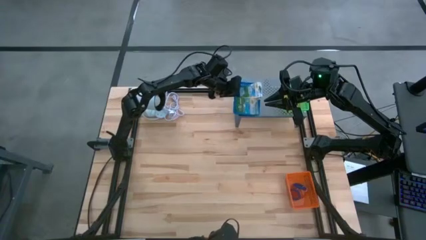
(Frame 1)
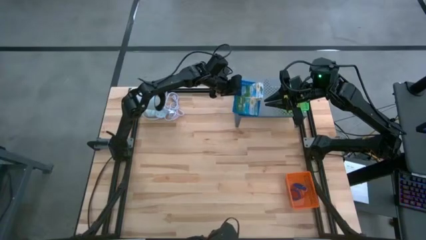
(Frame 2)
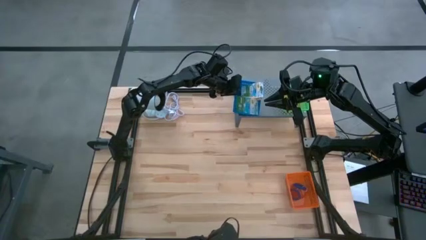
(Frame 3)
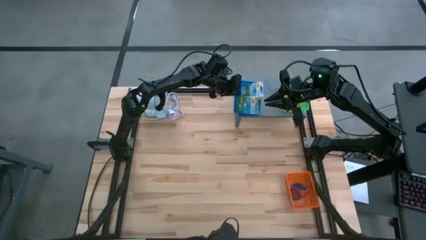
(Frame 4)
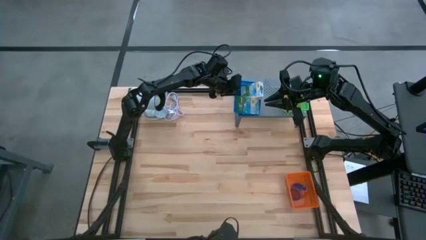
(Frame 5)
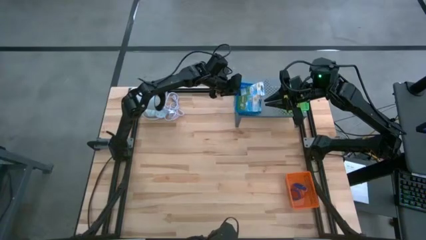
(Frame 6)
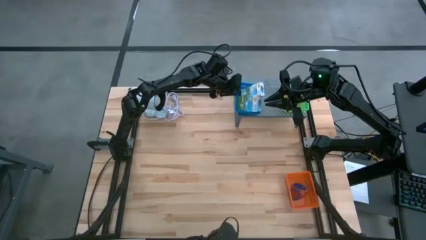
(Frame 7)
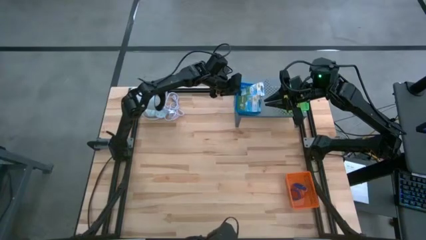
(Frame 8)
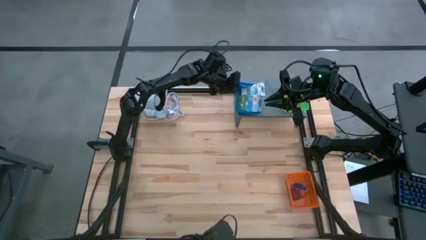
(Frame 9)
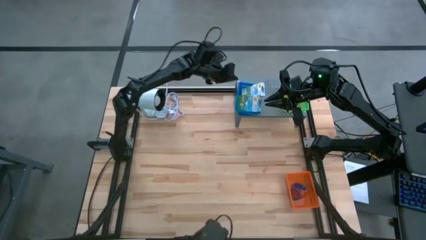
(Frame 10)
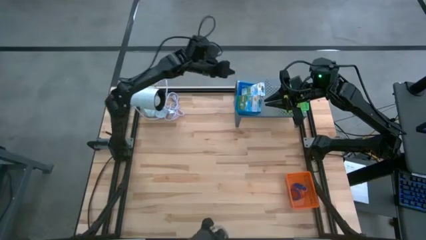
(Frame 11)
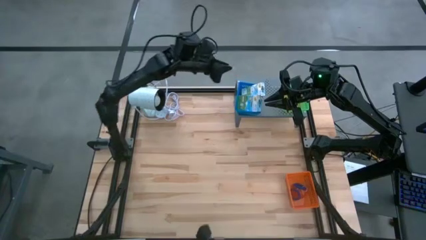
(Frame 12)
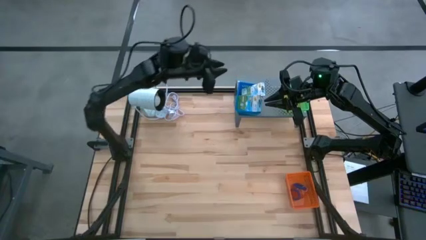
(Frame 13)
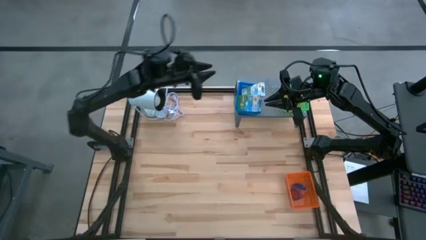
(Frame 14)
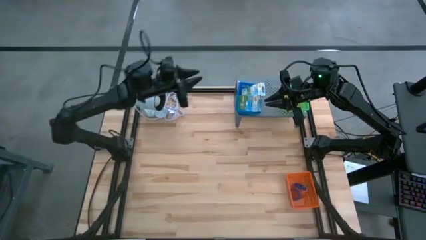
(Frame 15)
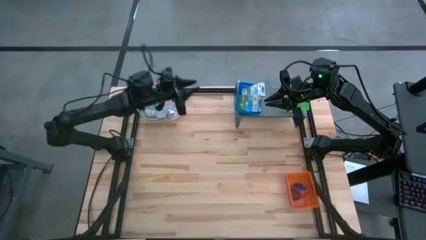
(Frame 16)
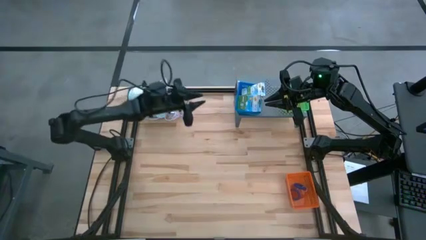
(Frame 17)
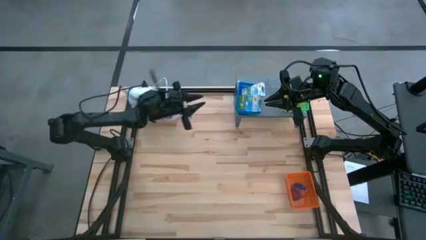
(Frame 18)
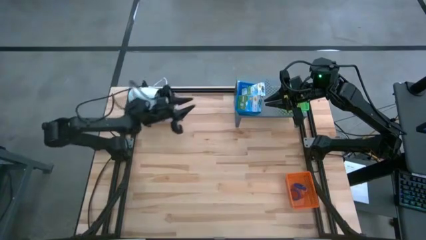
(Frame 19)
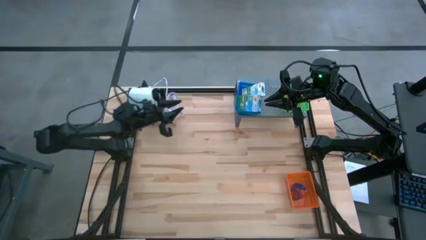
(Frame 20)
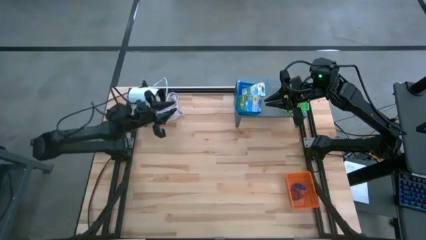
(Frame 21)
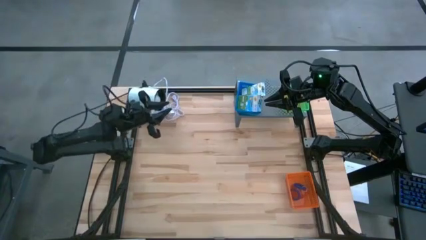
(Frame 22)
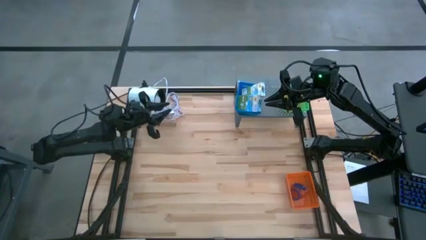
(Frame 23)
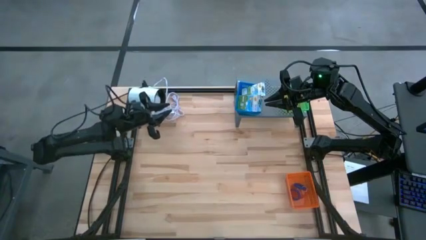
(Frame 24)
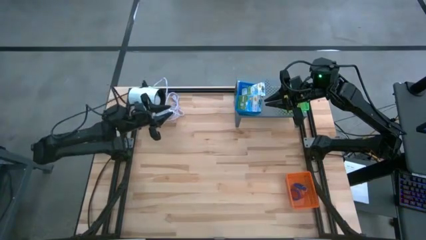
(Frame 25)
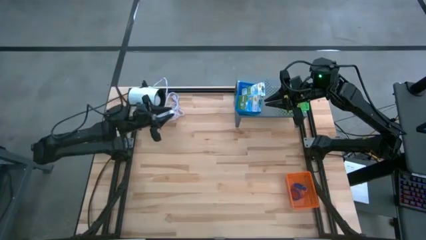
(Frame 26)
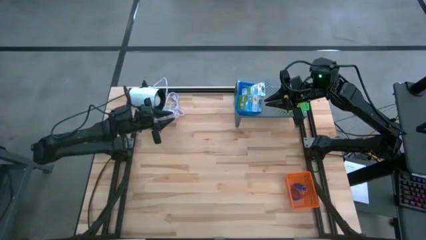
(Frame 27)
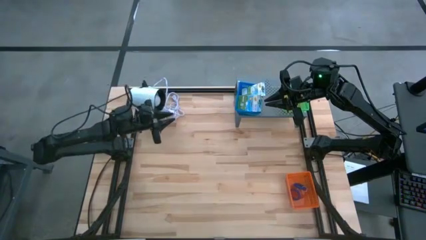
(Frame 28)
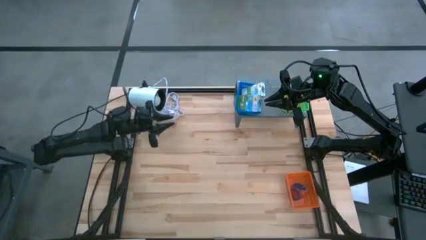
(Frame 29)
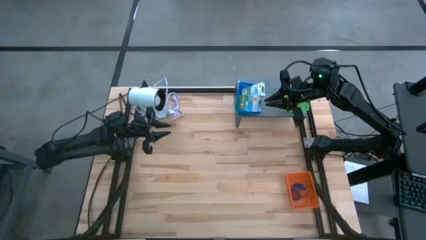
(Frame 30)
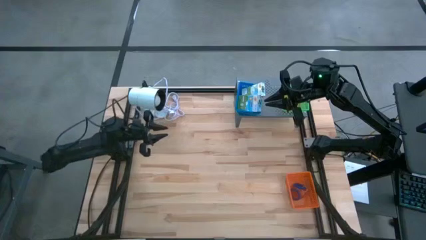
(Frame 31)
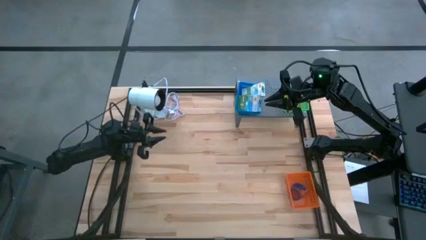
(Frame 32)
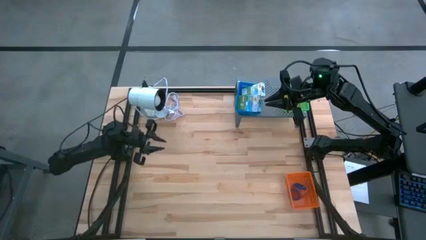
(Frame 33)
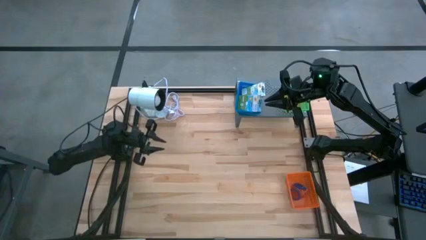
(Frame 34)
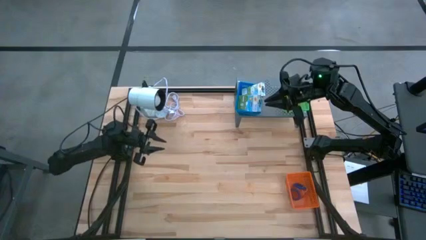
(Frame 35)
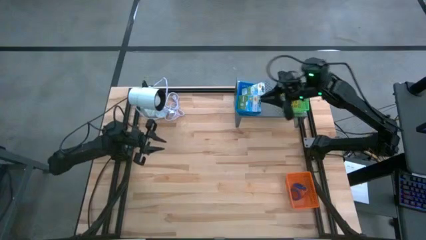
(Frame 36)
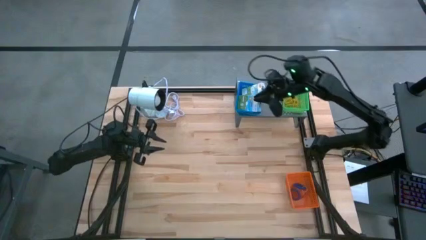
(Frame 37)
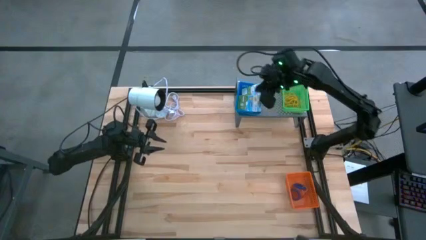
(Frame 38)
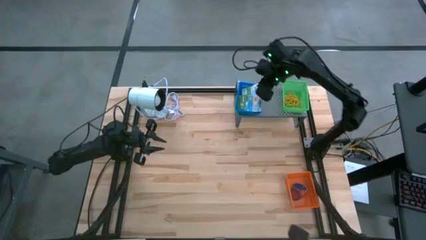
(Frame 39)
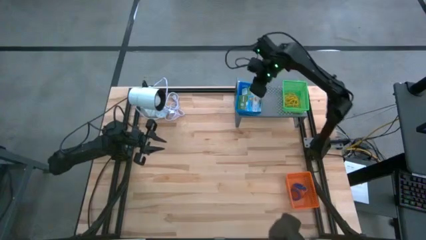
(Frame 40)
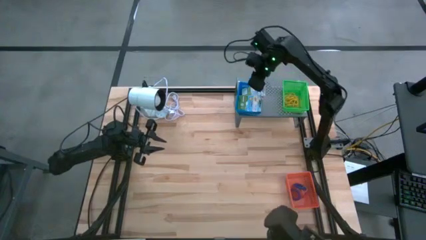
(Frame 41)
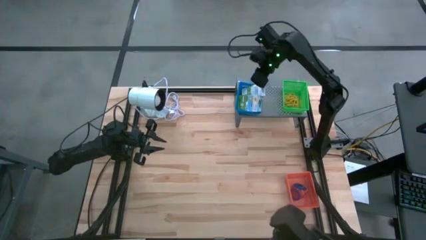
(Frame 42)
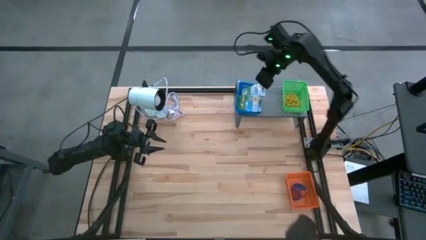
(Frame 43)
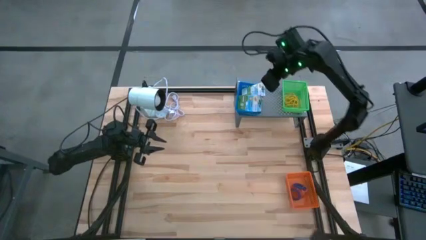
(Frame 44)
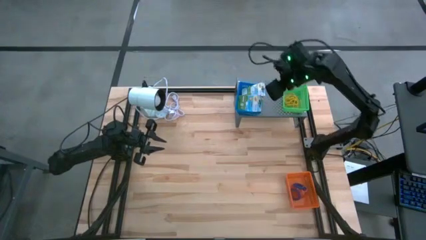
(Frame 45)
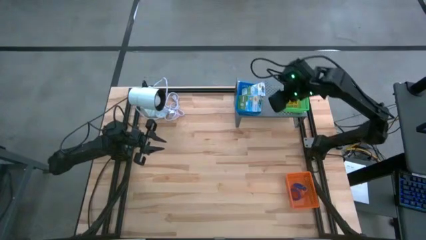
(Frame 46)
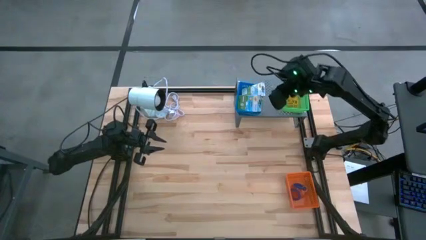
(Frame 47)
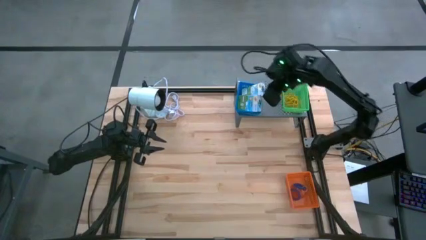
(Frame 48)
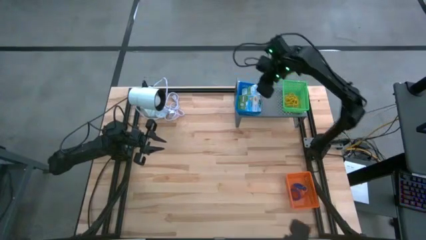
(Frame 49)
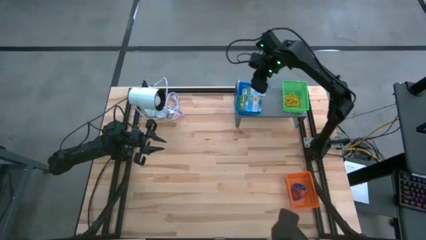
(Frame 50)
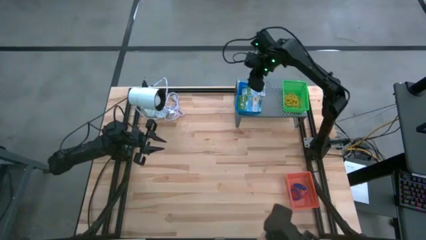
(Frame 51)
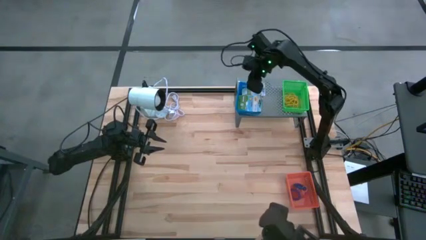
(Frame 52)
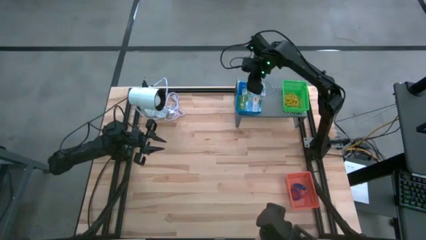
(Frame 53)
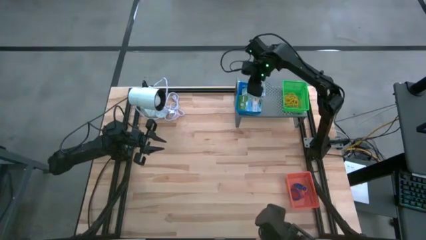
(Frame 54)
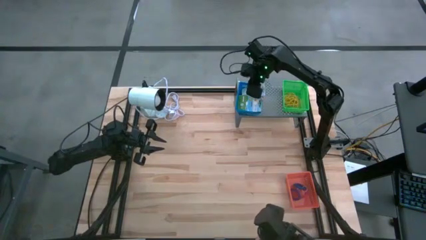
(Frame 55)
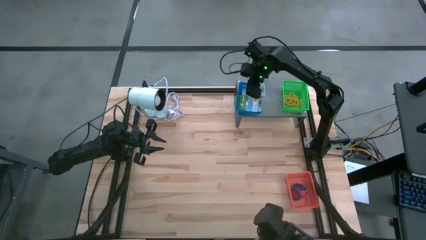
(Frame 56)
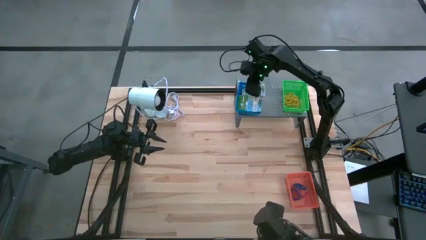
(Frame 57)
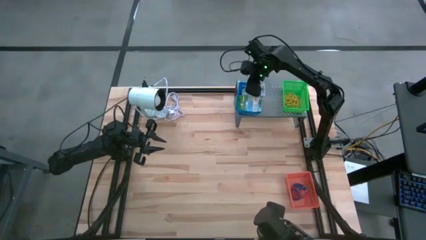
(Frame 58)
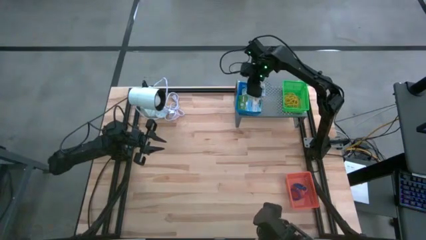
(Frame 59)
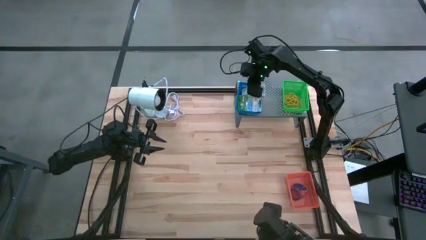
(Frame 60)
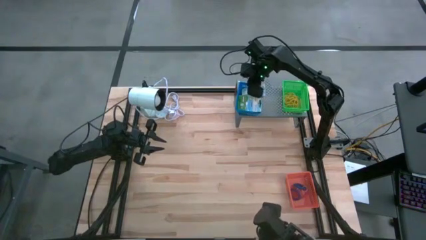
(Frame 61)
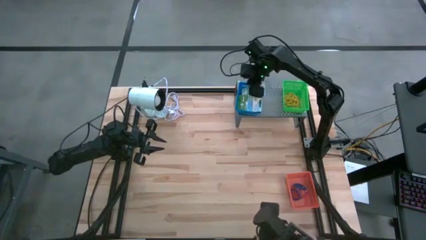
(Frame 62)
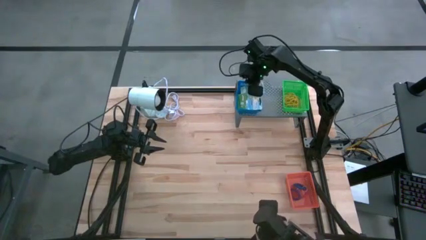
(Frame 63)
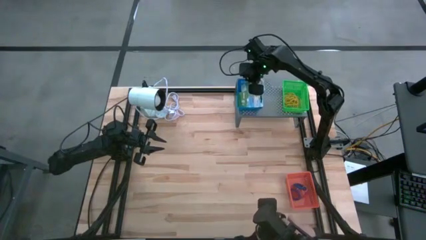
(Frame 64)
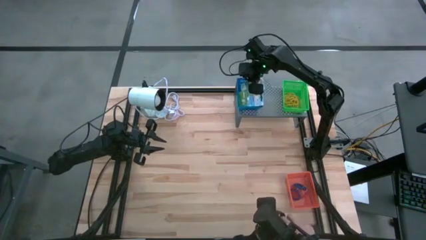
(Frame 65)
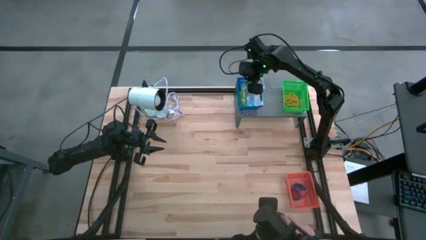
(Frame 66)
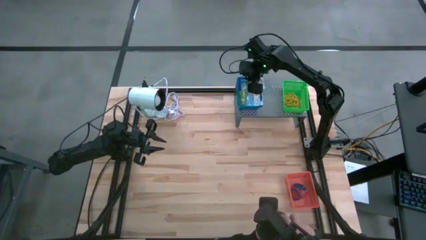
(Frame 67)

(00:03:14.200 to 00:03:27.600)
Task: Pick & Place Office Desk Supplies
Put the blue bin on the shelf

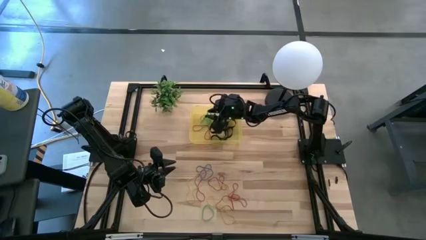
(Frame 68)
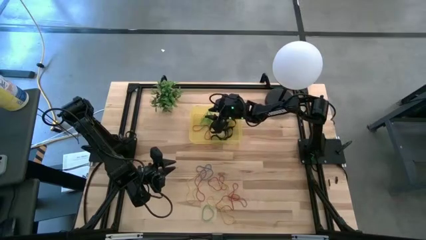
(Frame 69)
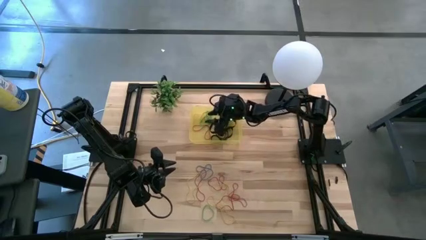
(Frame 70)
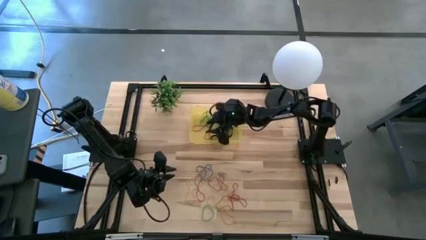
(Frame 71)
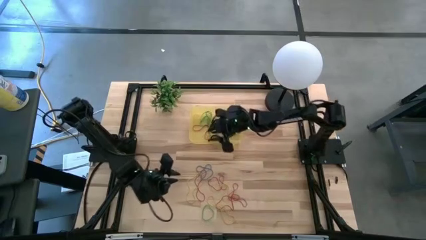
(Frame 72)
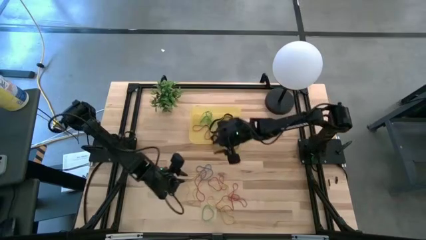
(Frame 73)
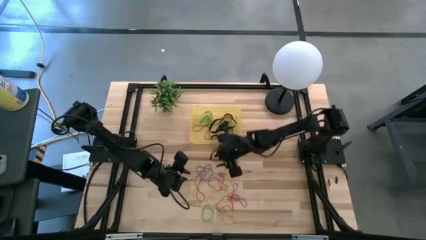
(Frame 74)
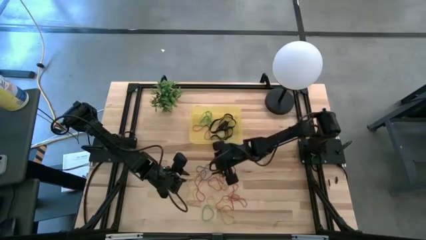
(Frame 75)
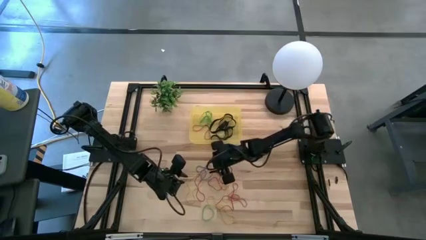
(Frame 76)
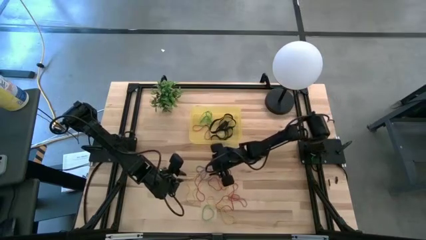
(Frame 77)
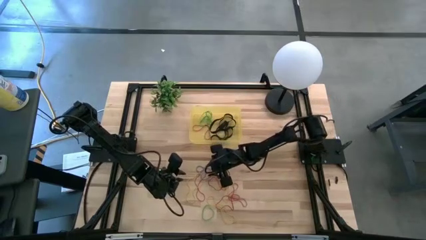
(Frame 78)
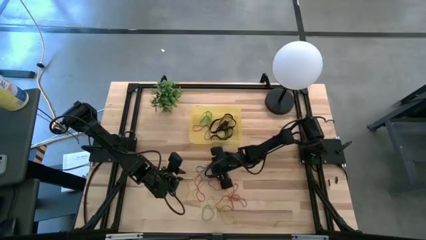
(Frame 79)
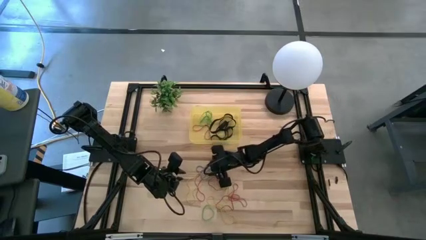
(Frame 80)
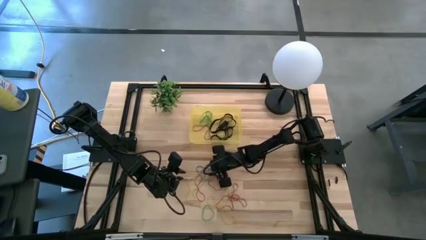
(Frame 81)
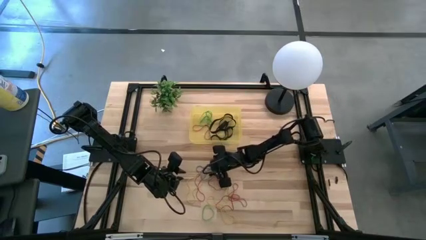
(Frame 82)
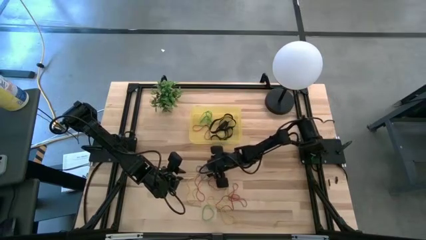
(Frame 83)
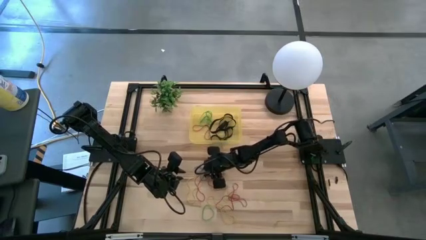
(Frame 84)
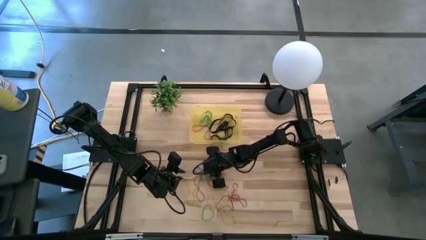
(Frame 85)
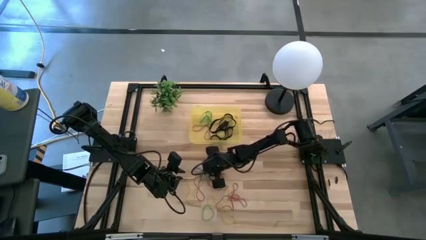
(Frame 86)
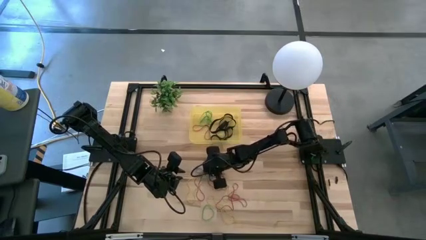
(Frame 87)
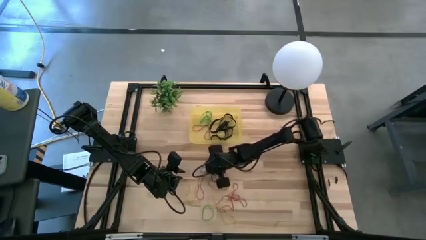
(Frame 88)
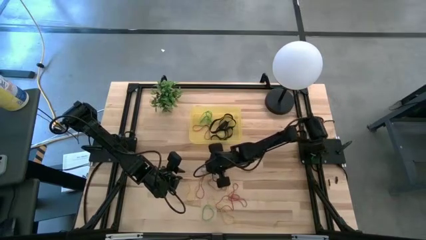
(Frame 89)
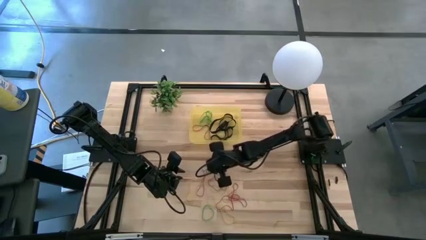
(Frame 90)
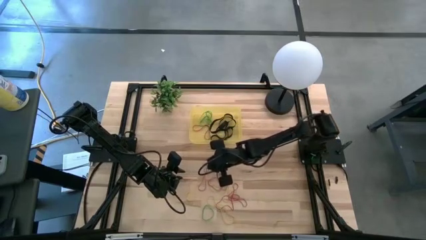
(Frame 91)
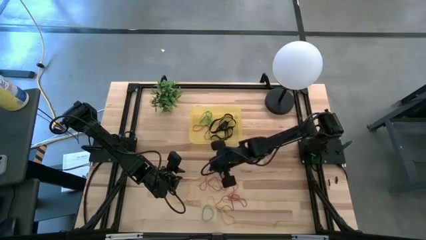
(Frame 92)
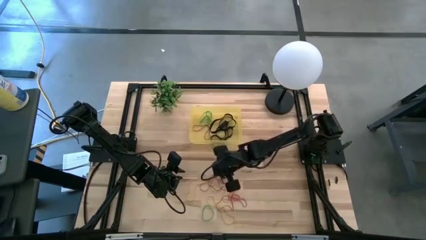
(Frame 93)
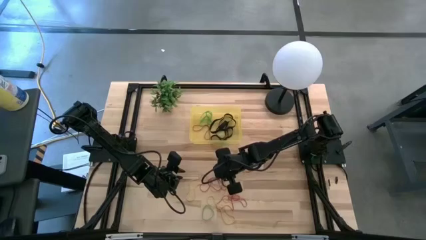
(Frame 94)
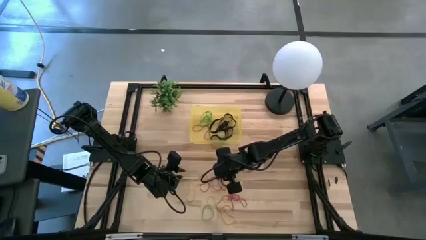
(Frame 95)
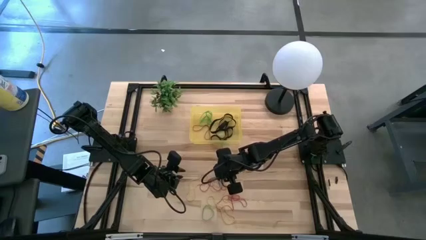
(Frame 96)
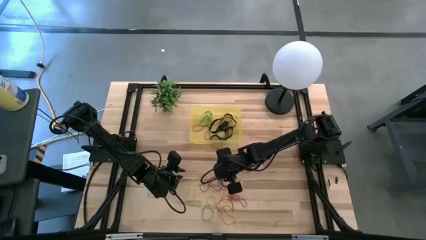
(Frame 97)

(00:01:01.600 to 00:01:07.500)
Task: Pick and place rubber bands into bin
Put the blue rubber band into the yellow bin
